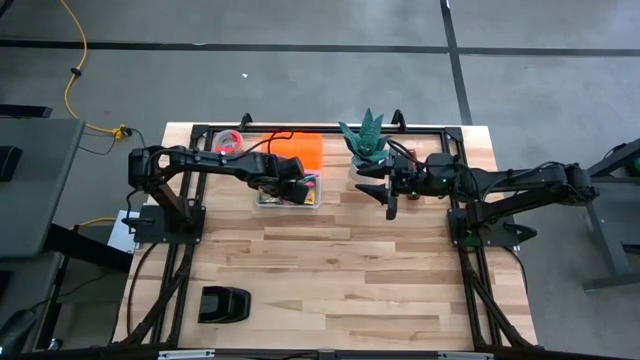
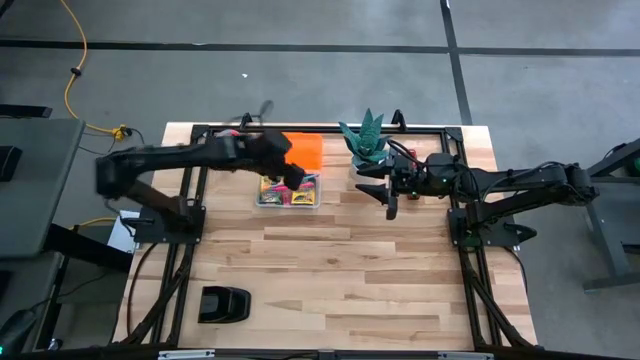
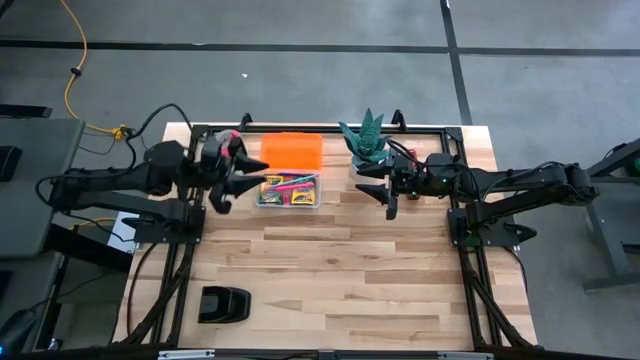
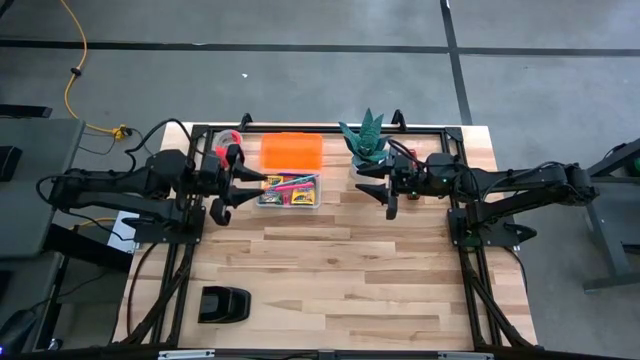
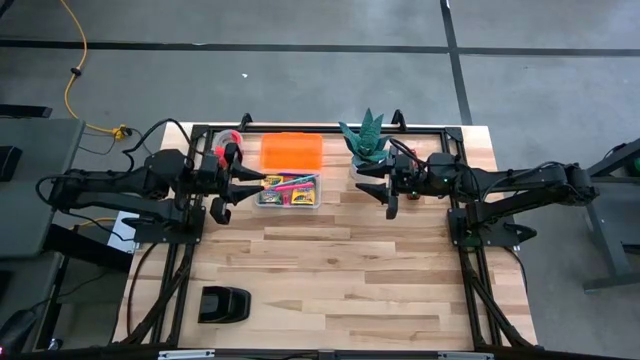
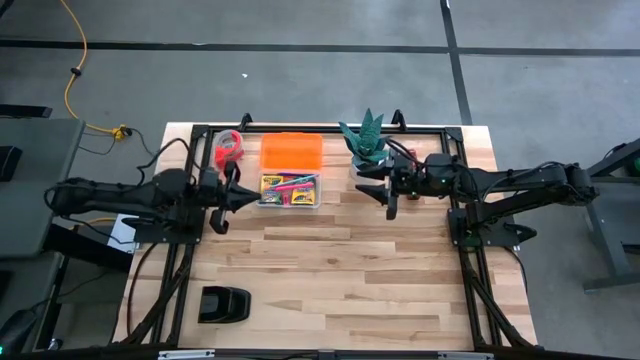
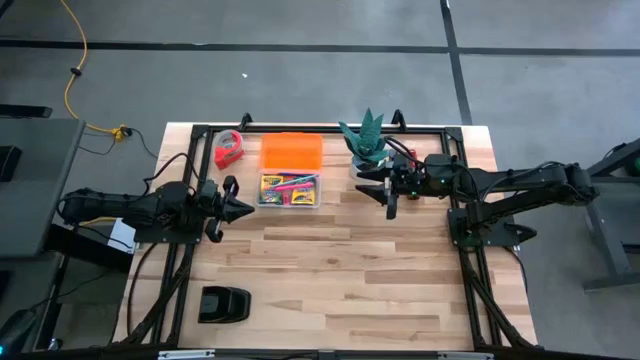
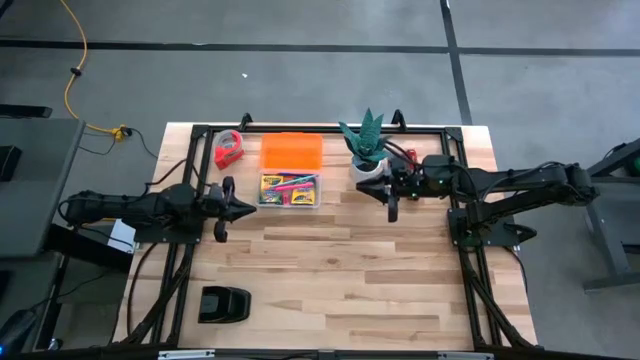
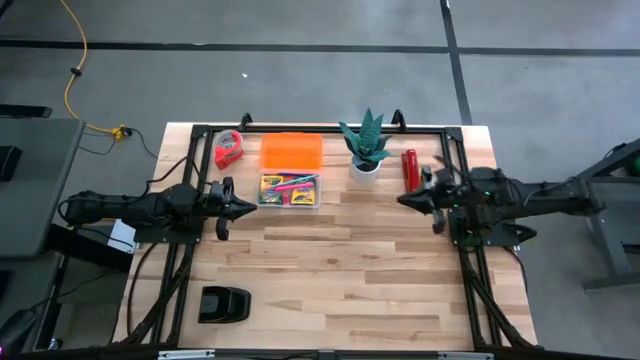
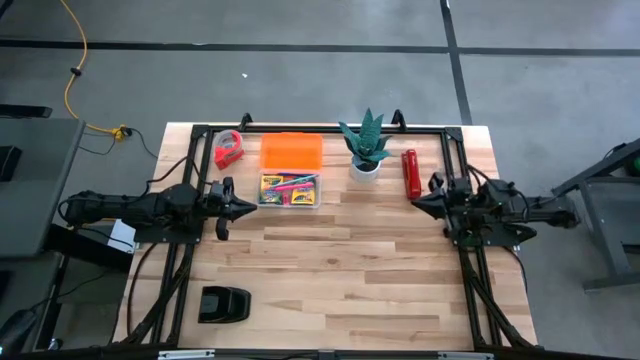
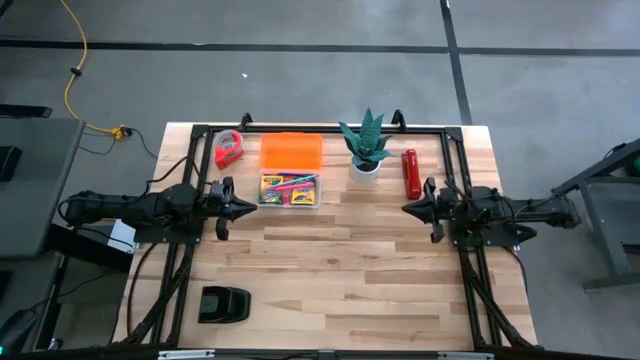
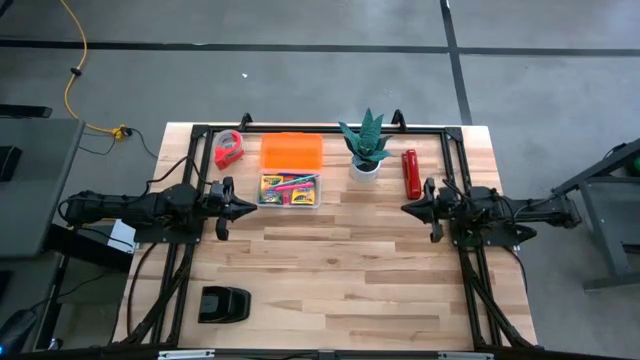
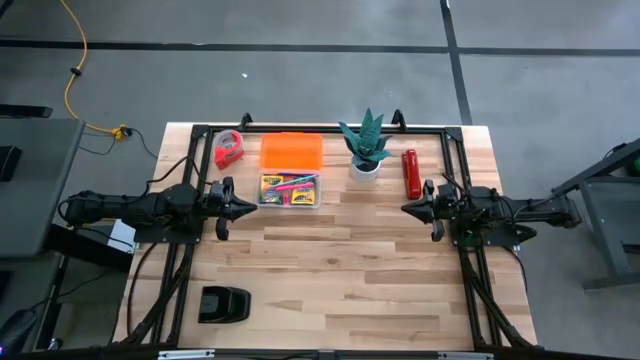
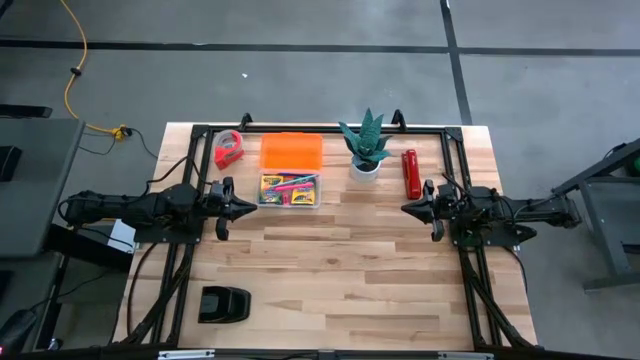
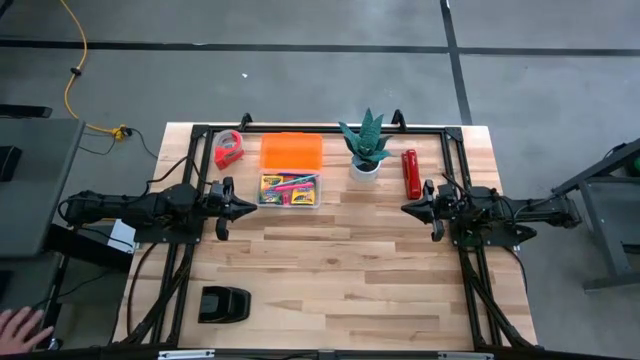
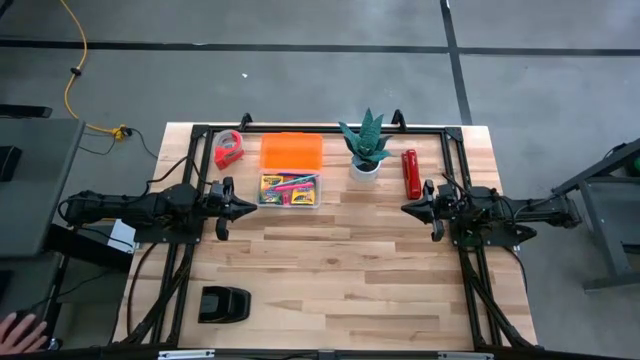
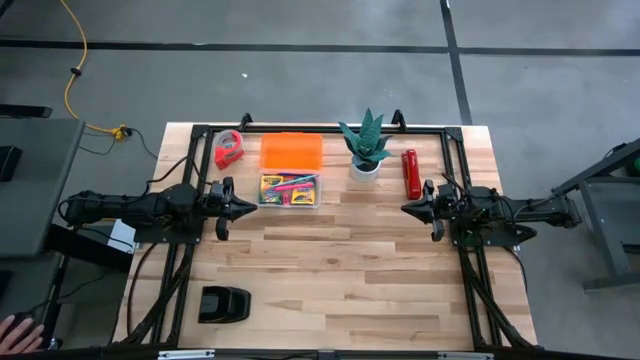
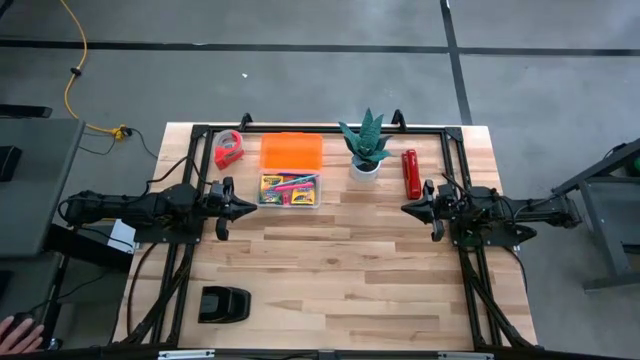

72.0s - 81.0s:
Task: Pack school essentials
Return to Home Position

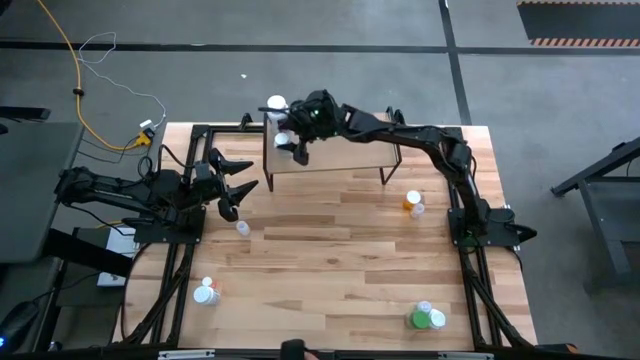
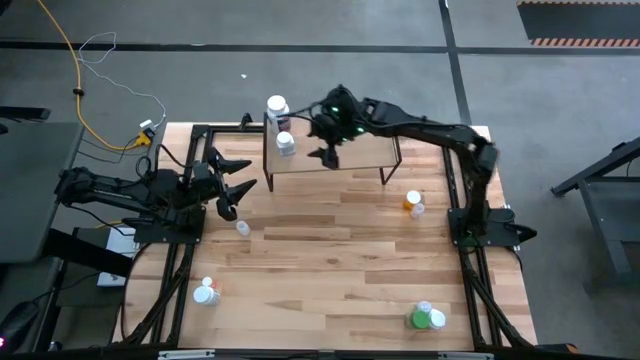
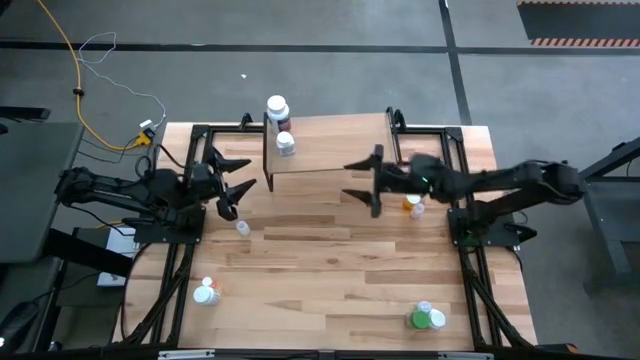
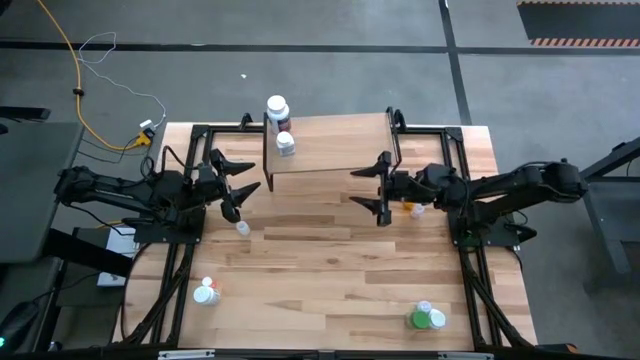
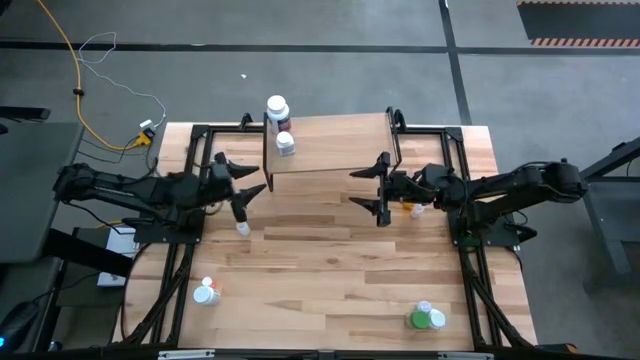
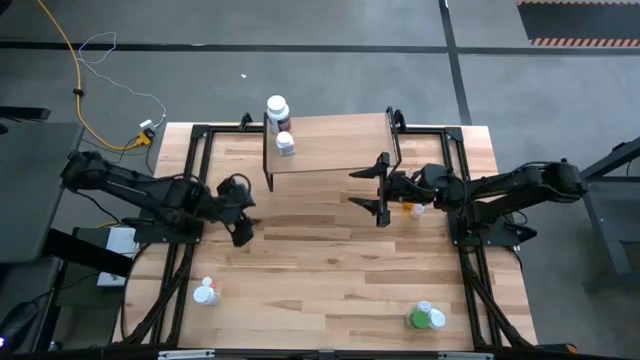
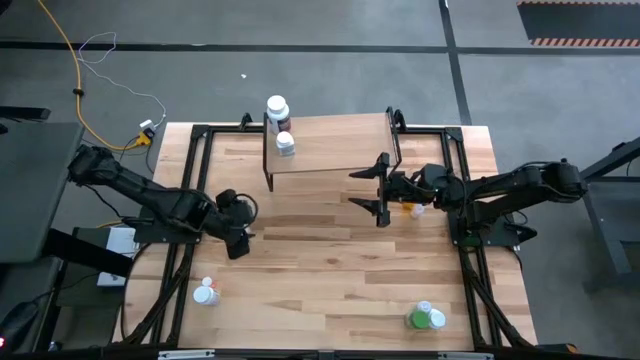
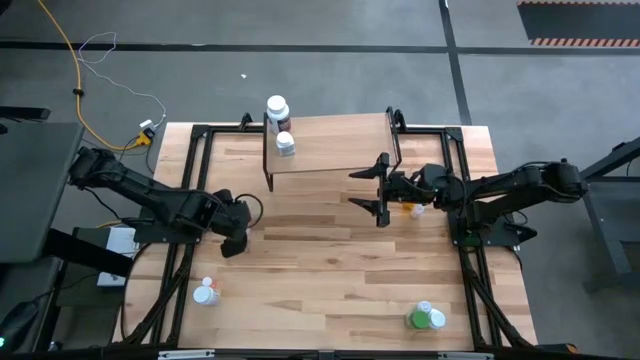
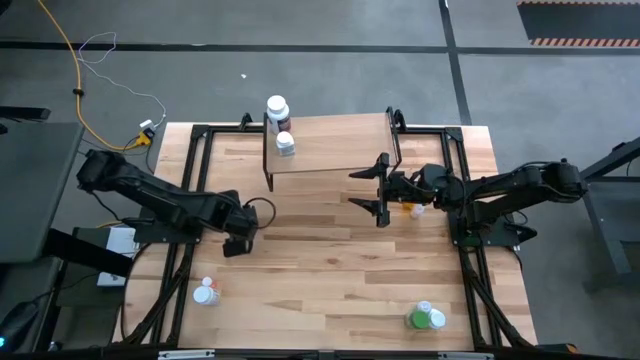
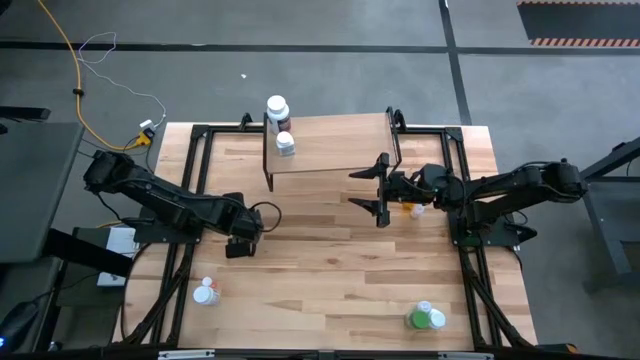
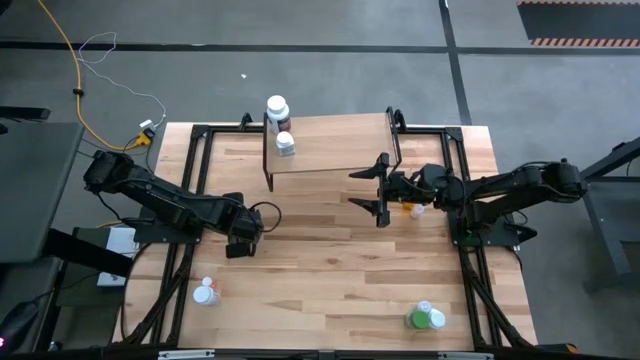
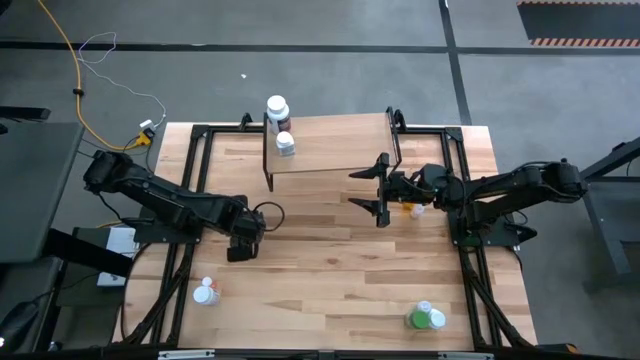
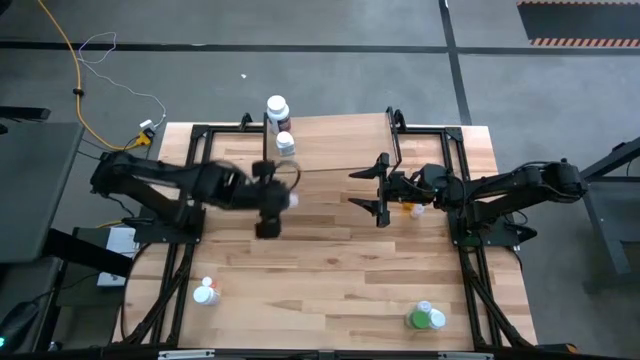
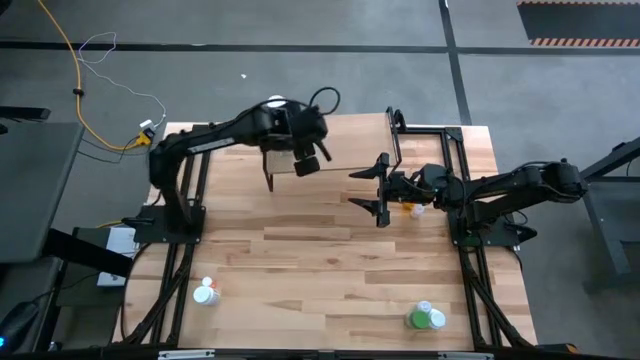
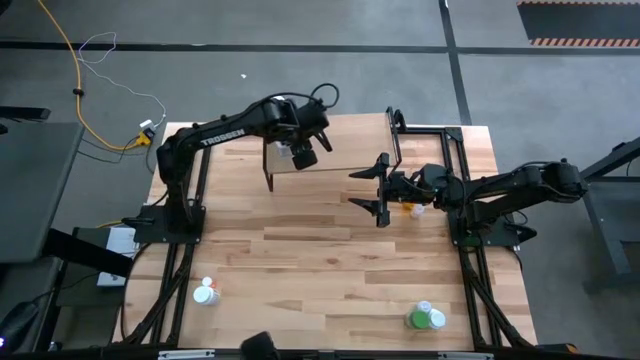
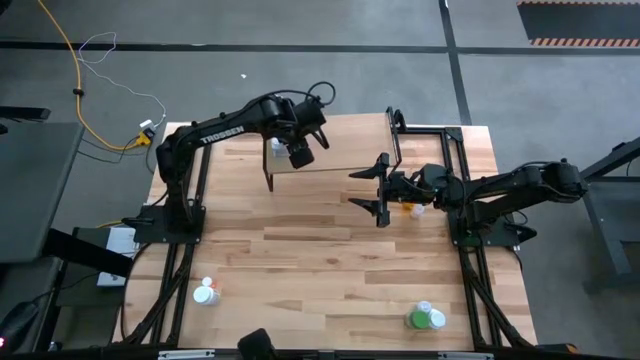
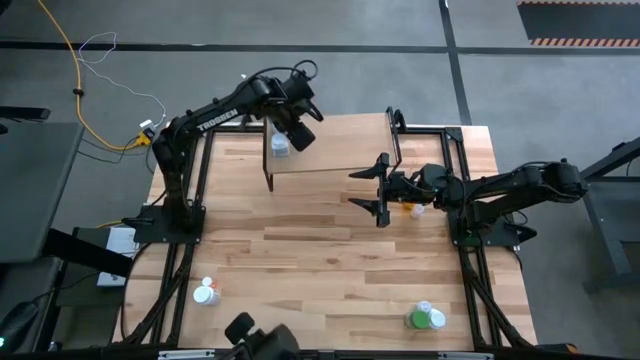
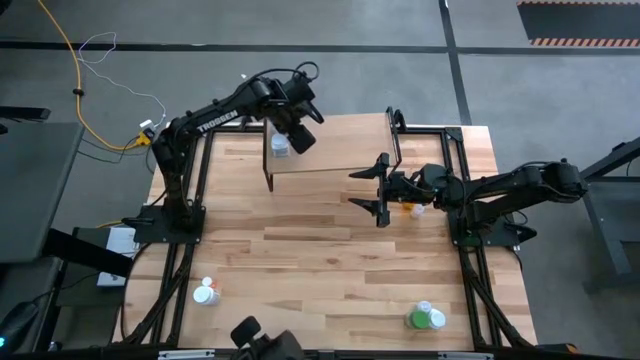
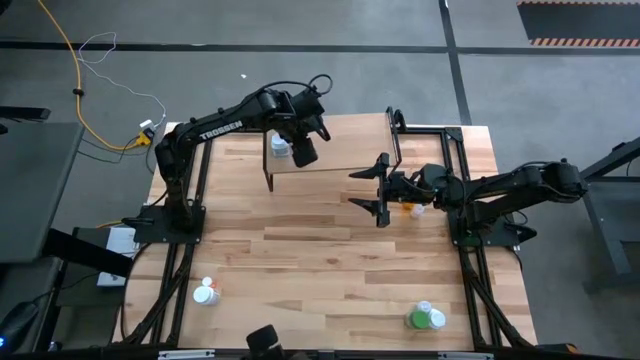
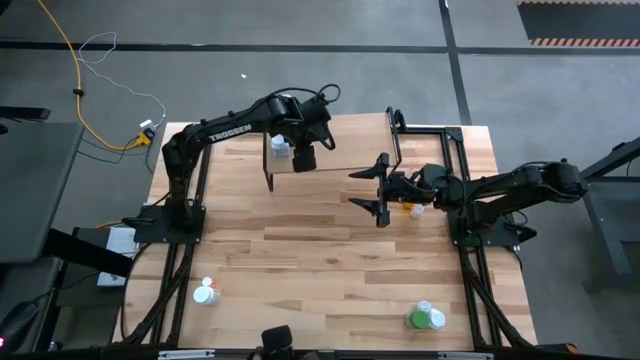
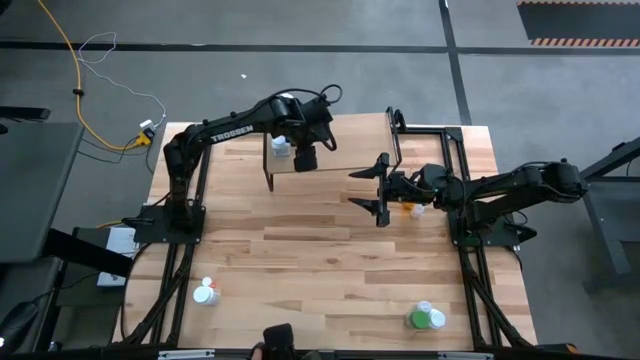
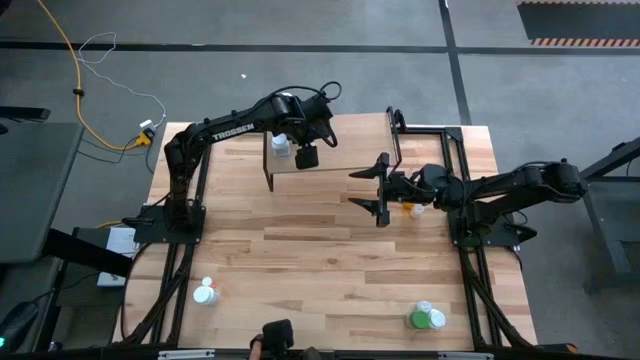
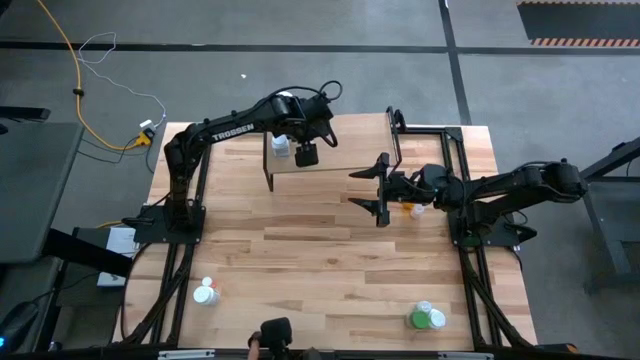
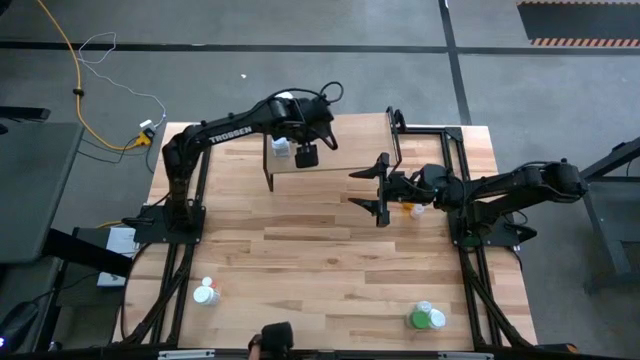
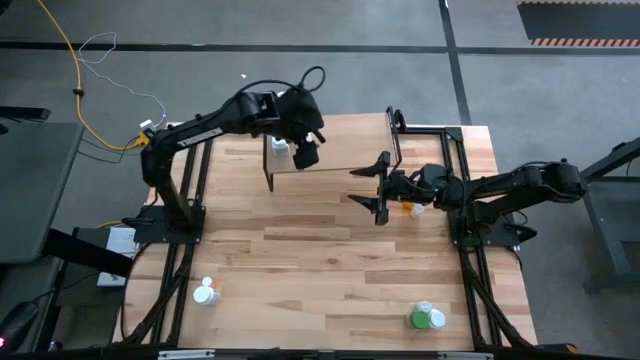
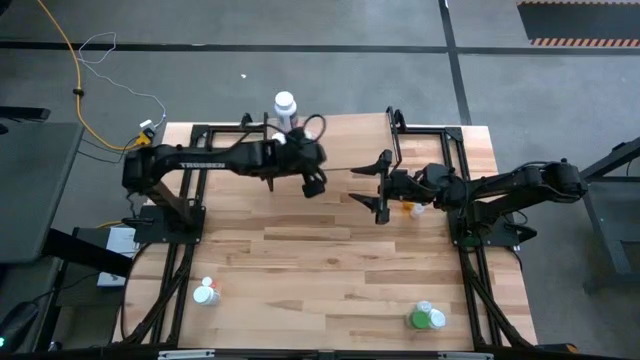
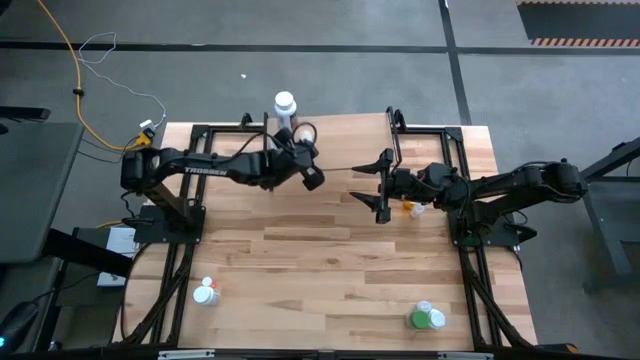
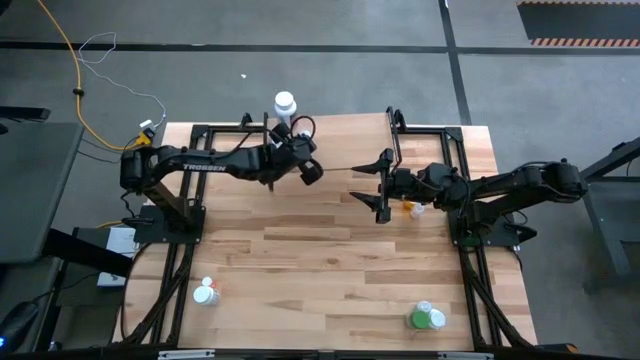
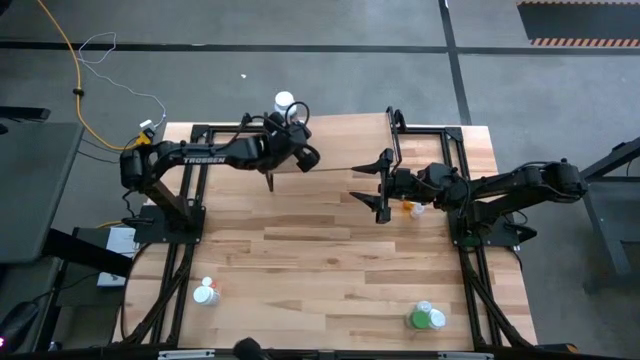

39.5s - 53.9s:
Task: Pick and place medicine bottles onto shelf by color
Put the middle white pill bottle on the shelf
